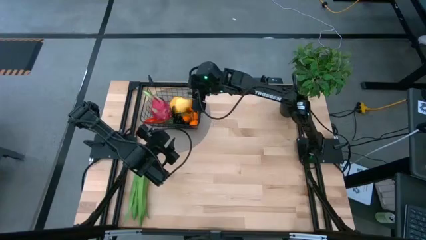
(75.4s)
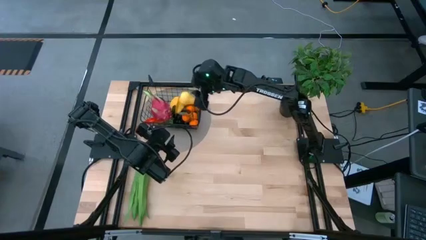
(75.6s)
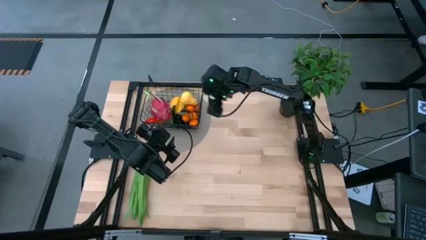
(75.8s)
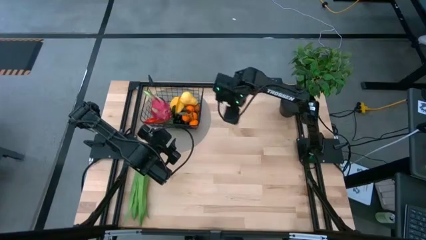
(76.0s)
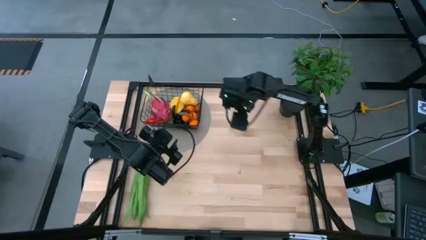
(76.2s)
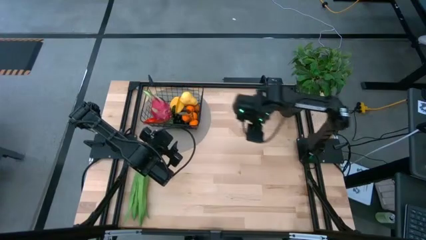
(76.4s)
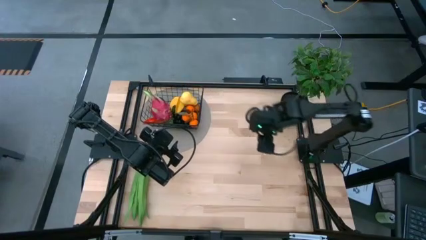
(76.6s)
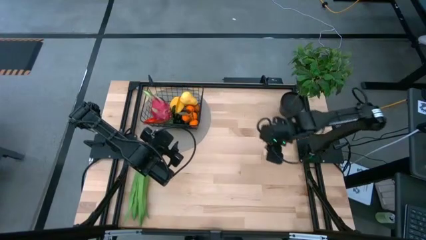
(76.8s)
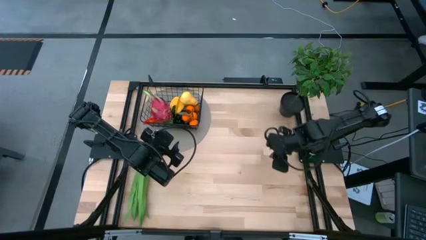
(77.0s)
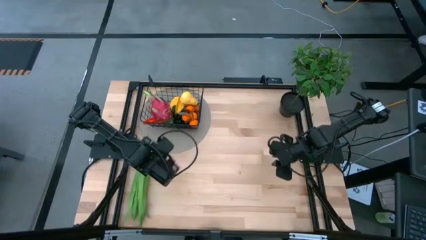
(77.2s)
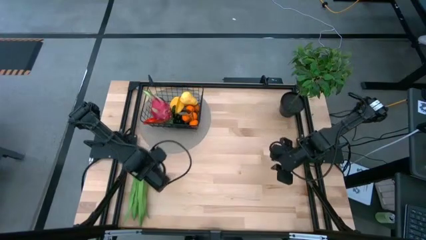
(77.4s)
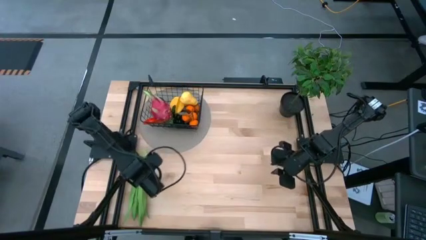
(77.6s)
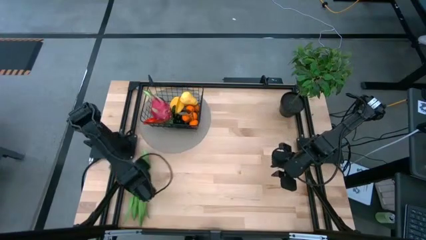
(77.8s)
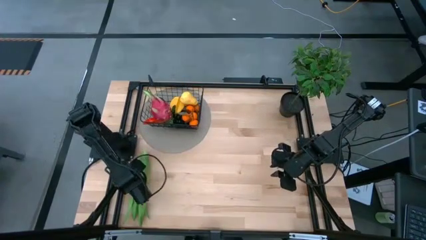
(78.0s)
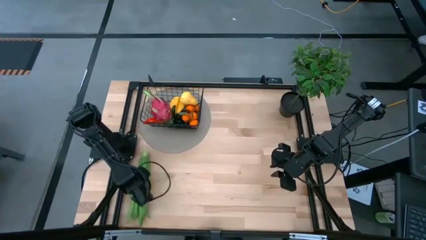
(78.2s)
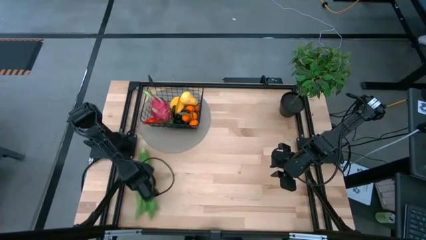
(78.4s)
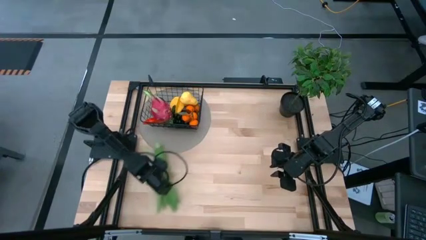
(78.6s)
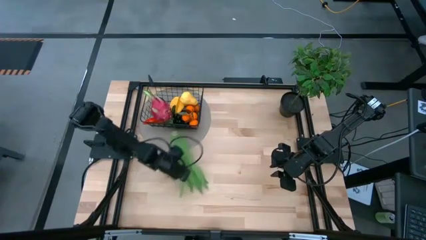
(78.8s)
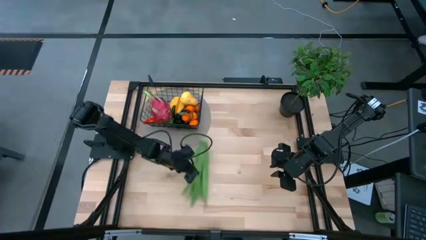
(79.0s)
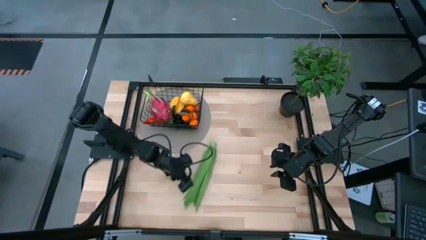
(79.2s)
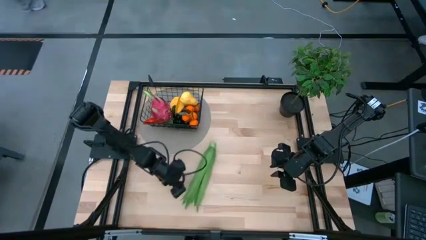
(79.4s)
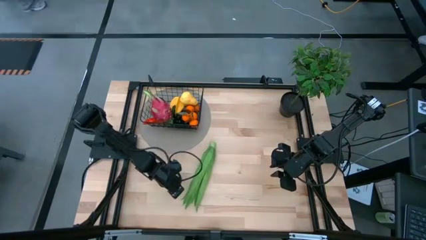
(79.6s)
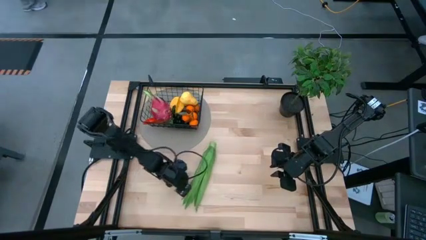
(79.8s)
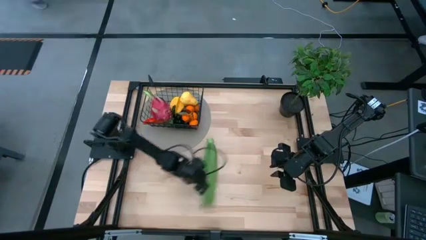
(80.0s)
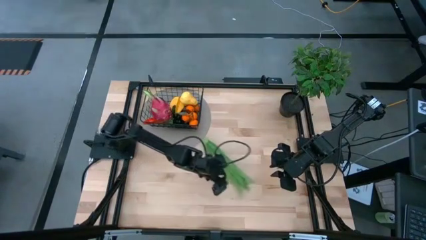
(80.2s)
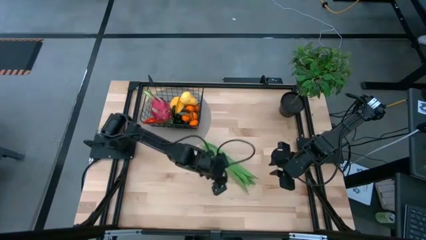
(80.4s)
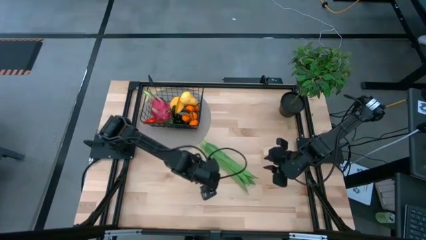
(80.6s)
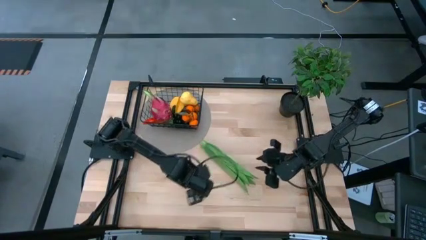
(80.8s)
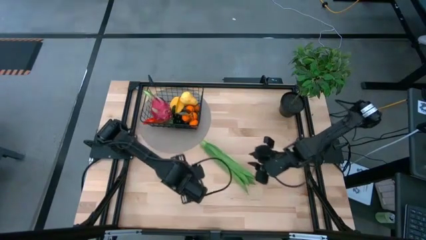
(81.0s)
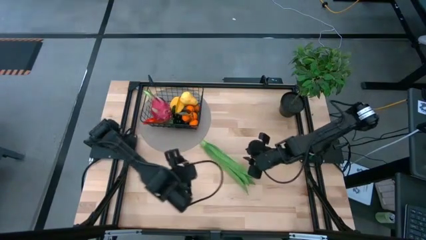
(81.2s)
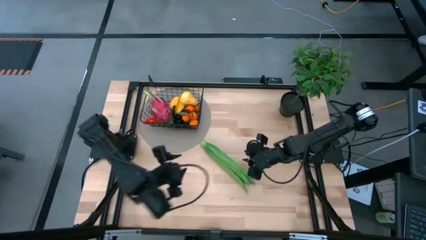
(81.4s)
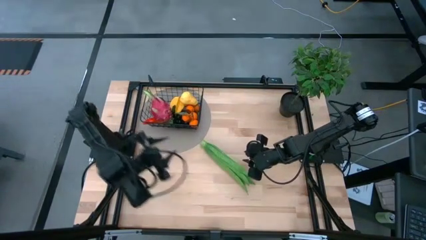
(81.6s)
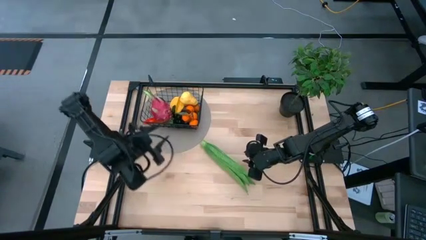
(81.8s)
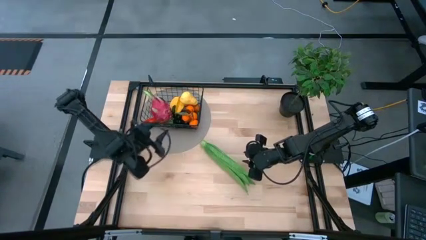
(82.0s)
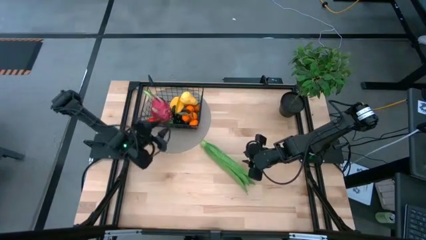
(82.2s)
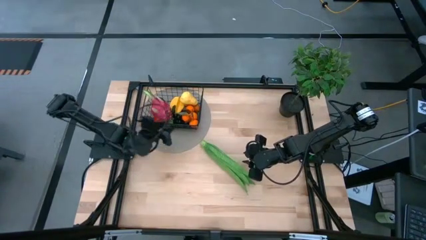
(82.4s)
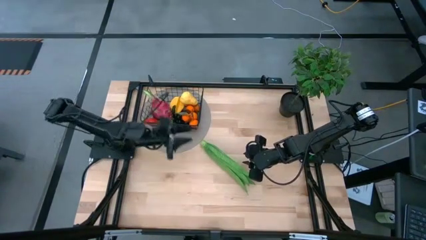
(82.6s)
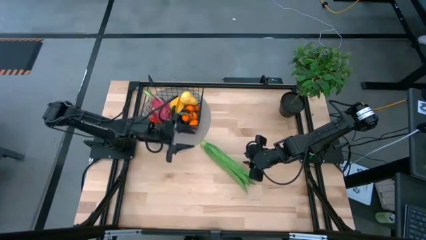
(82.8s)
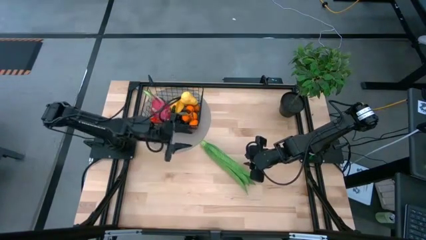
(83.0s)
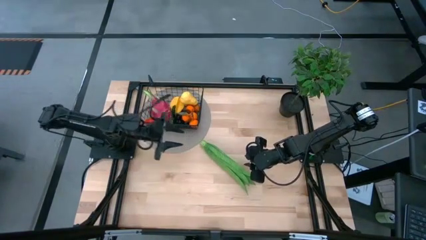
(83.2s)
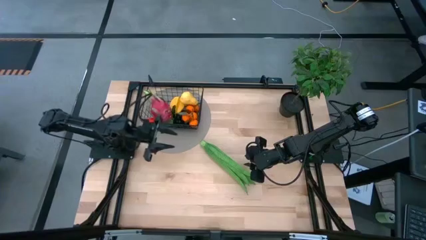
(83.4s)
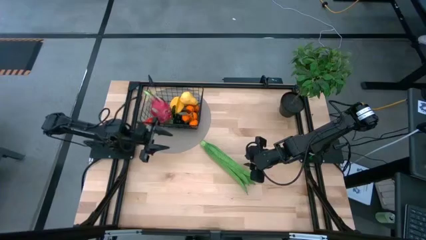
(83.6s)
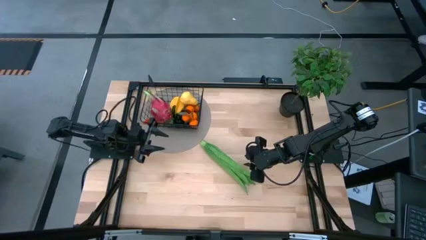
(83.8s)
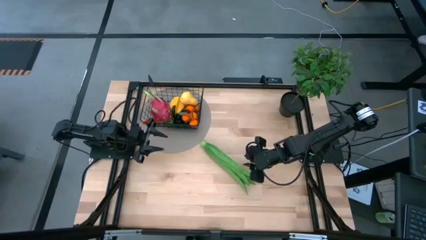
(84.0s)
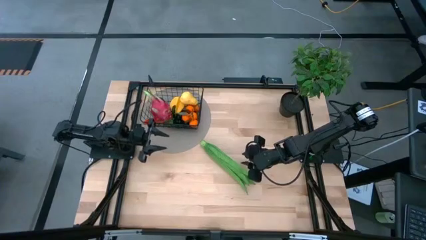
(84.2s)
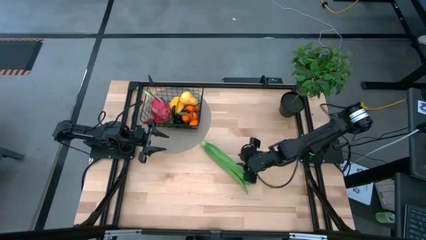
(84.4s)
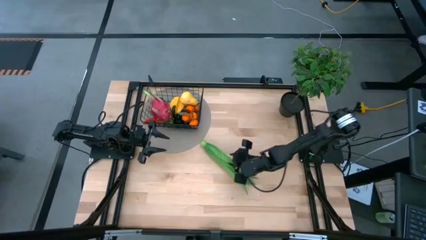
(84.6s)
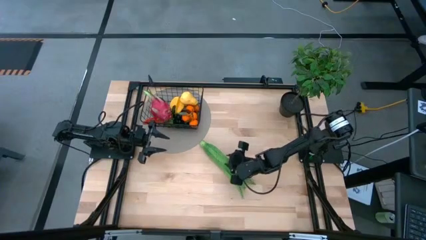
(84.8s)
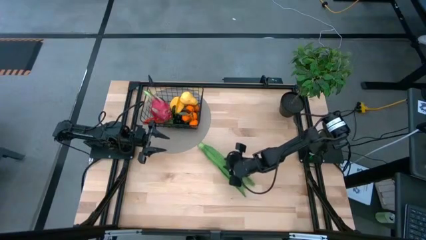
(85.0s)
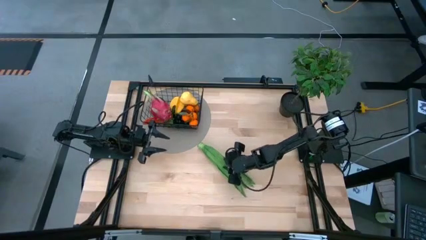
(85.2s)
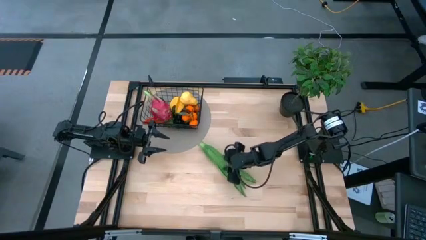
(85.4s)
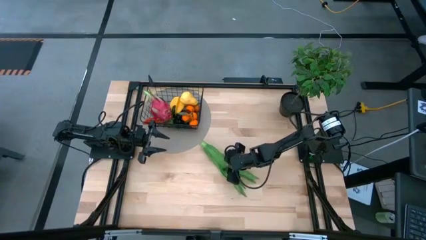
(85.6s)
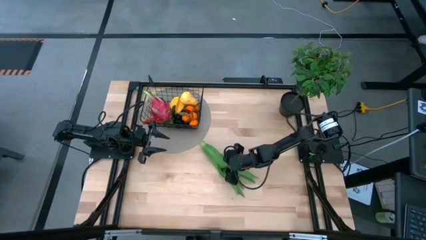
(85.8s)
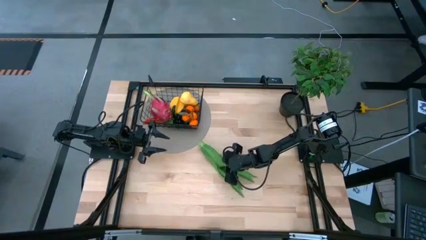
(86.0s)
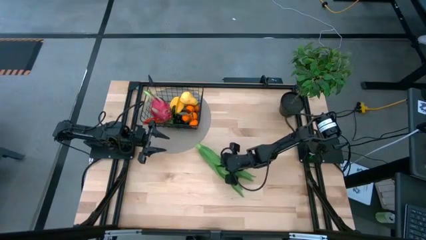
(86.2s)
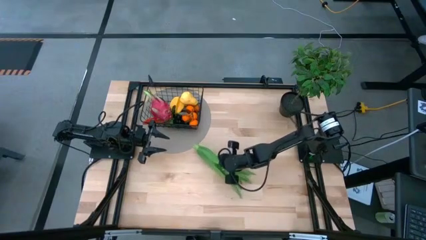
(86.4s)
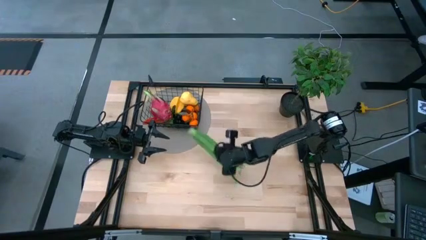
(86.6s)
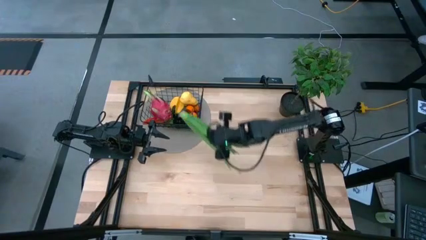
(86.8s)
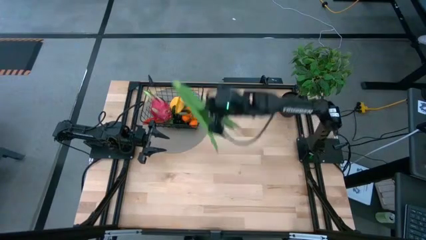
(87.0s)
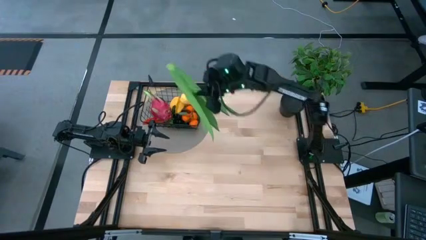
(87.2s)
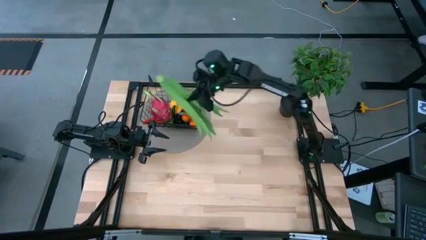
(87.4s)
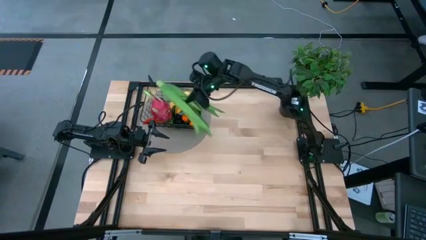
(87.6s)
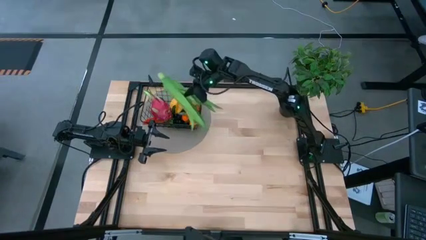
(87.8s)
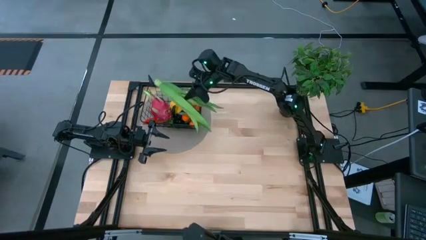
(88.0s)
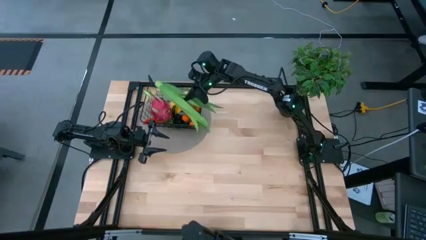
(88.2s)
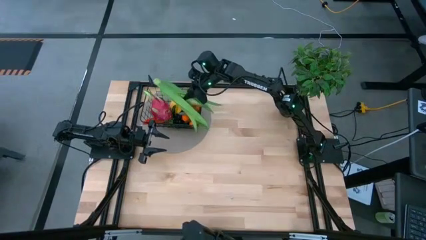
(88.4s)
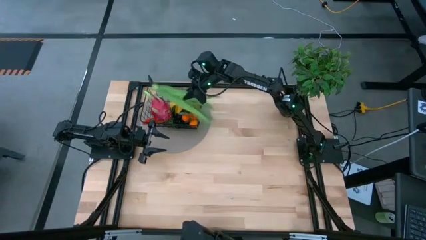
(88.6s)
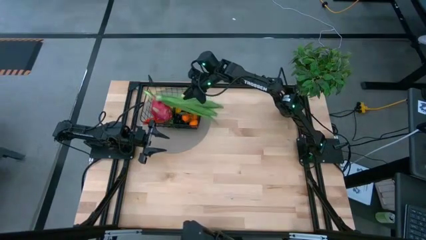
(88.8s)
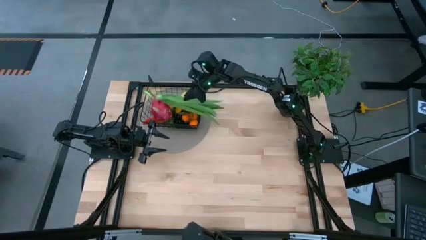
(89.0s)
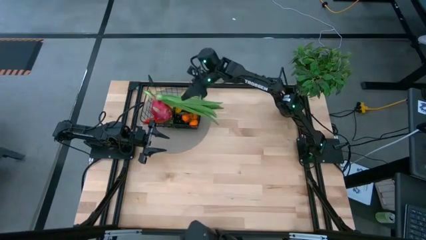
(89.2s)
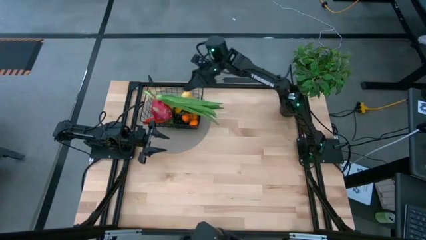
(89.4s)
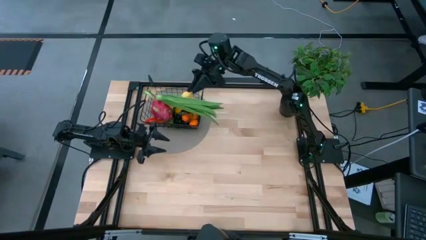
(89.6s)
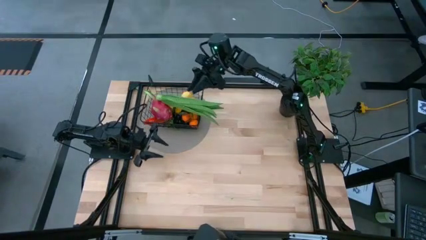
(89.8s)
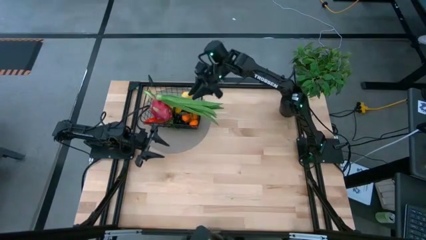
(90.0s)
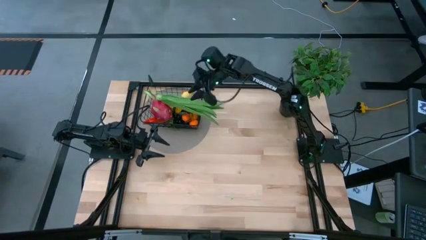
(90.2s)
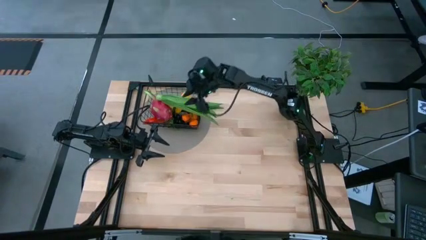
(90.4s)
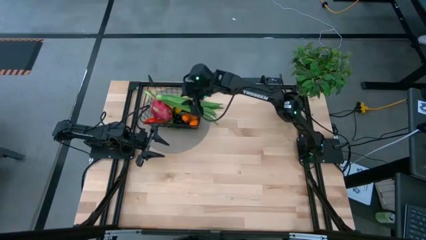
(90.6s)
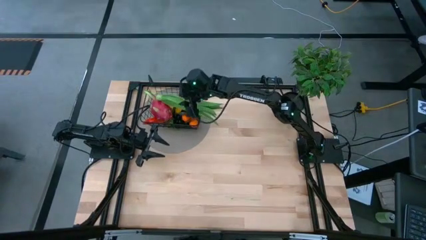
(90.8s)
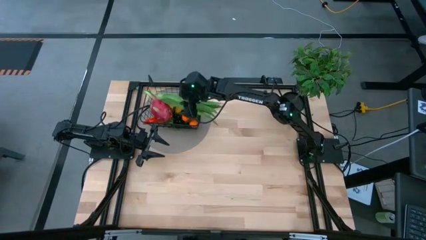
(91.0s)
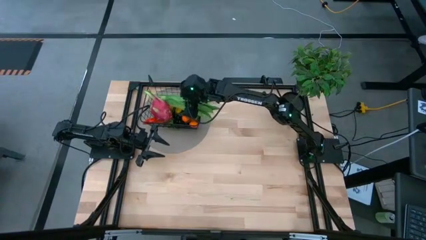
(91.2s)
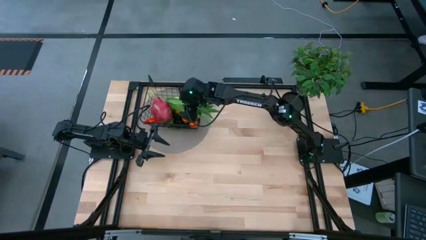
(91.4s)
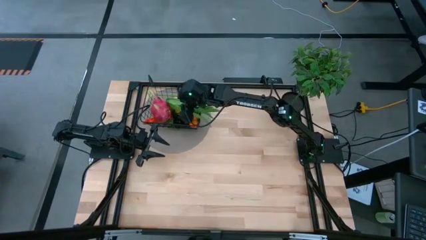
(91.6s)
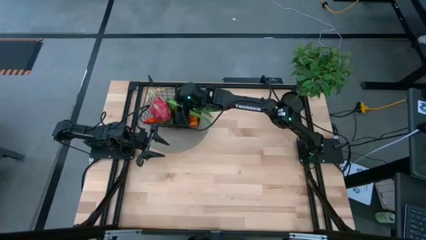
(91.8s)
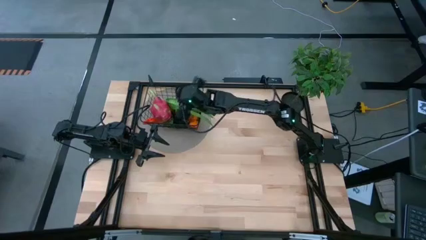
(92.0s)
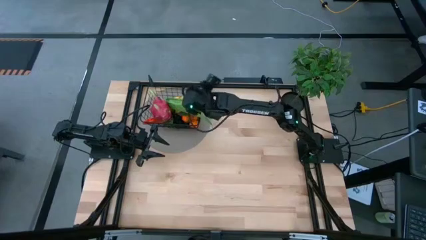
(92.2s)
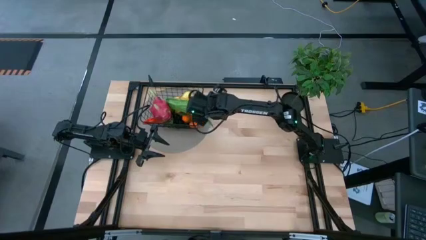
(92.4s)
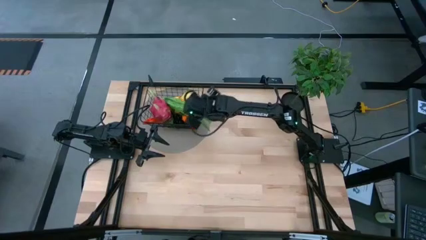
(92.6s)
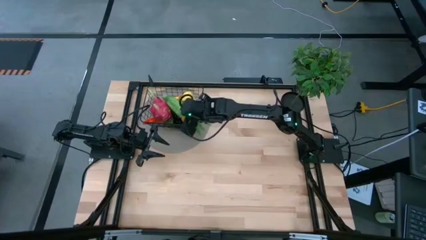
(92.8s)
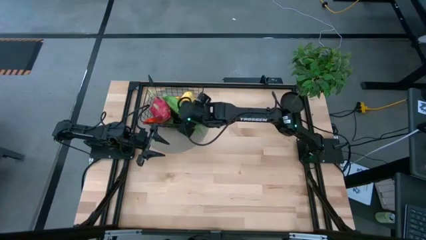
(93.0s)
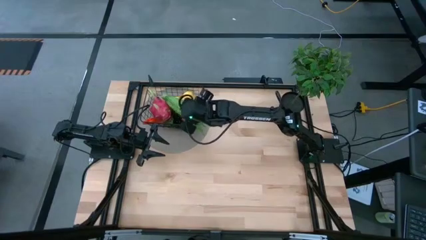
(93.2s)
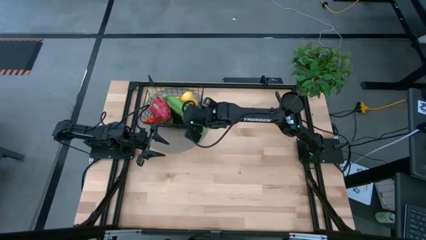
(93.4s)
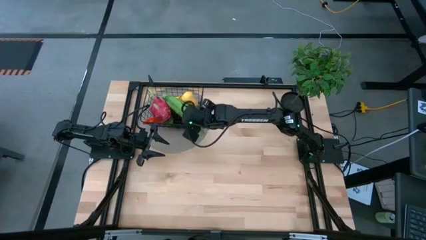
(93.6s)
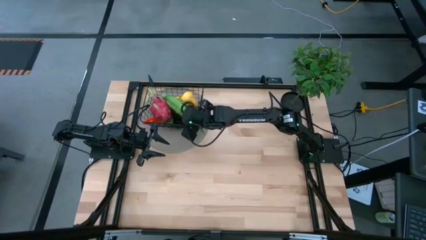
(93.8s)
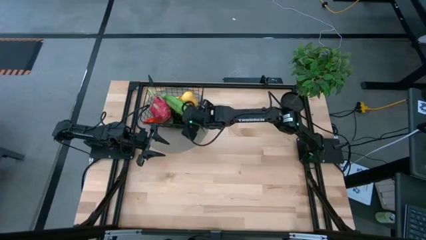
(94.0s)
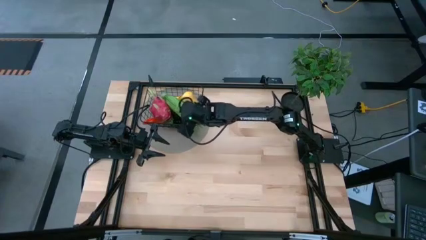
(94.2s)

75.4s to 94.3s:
Task: Build produce basket
Put the green leaf lettuce into the black wire basket
